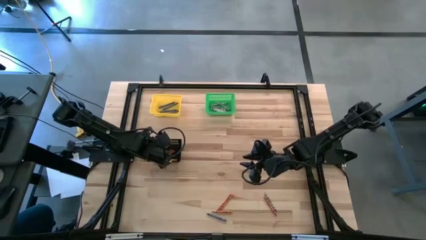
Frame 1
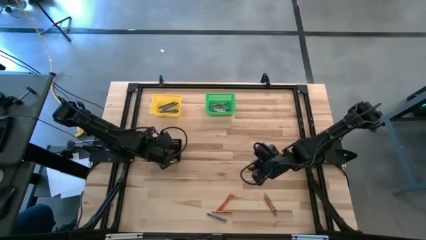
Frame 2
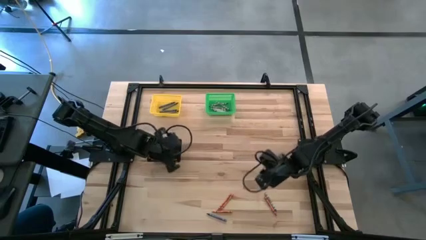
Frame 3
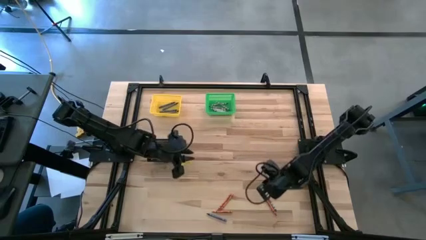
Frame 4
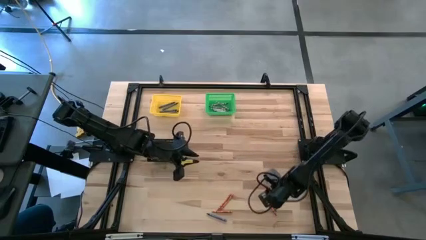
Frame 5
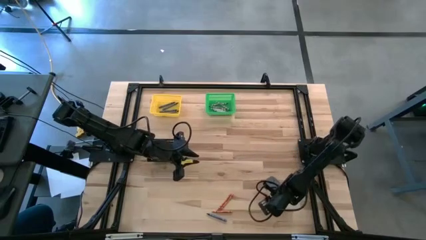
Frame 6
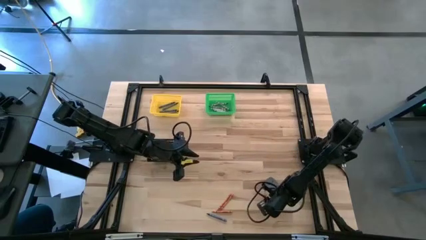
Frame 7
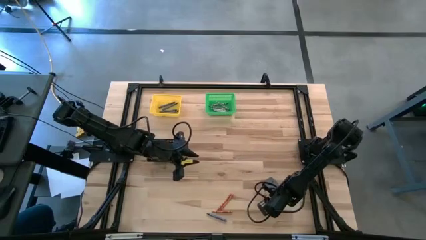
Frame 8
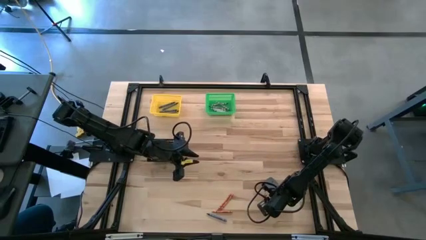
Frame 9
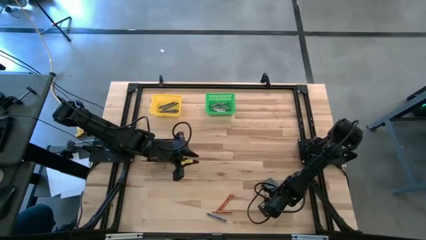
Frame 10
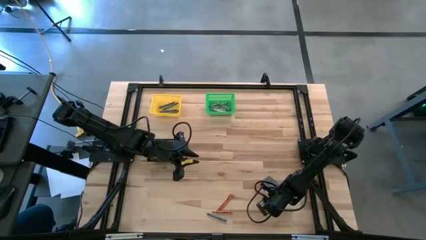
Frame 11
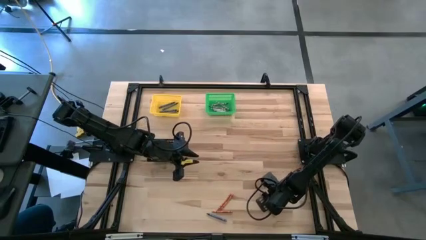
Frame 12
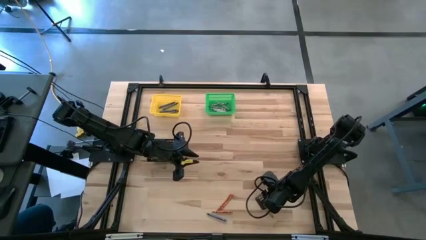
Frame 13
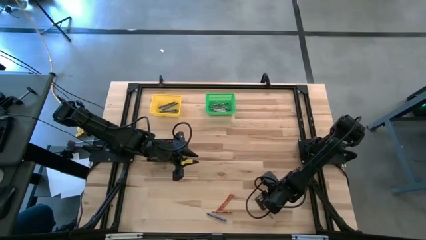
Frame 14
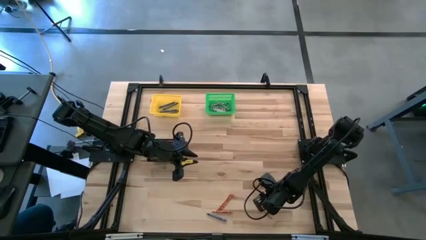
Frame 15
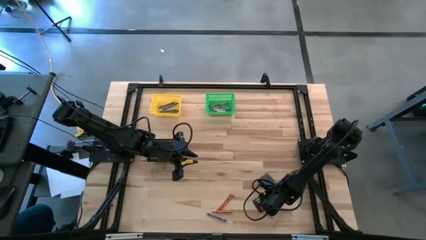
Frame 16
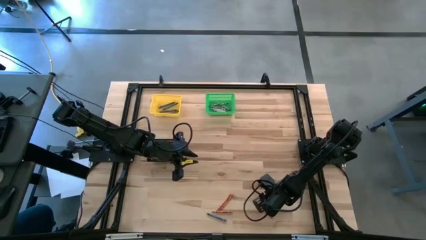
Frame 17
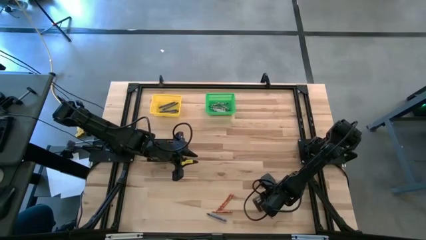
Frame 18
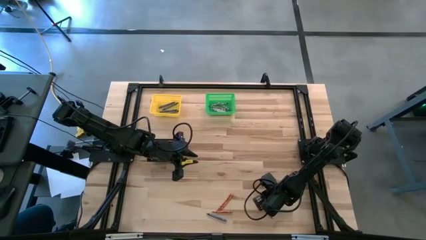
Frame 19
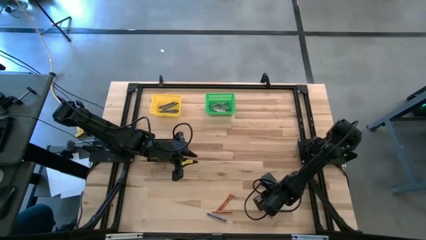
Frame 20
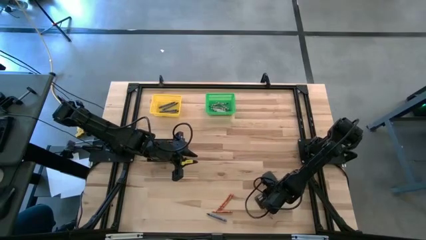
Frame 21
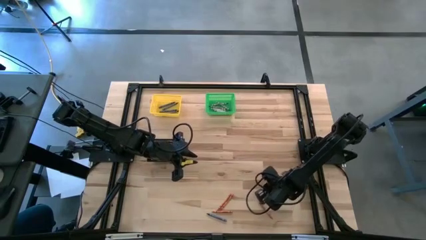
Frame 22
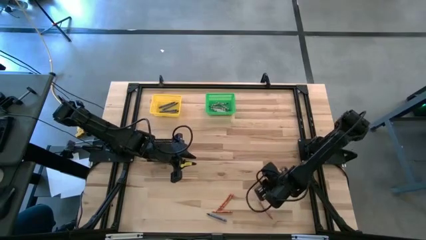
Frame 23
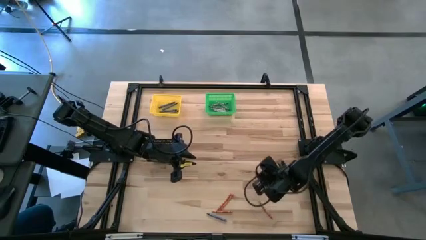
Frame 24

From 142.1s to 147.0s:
Task: Sort crayons
Put the gray crayon into the green bin

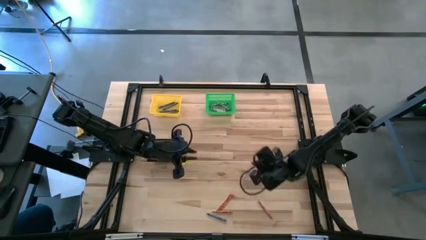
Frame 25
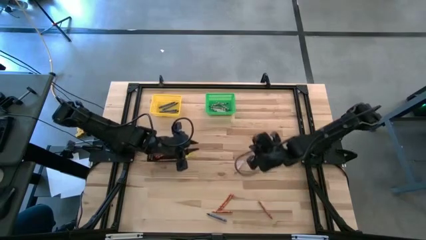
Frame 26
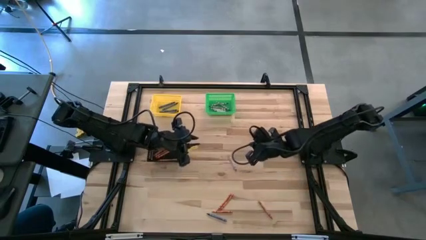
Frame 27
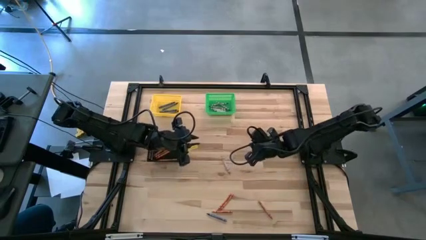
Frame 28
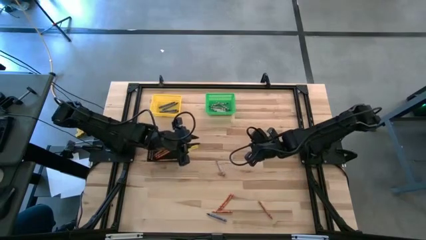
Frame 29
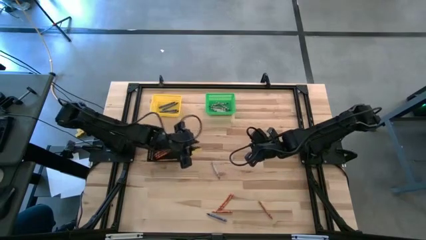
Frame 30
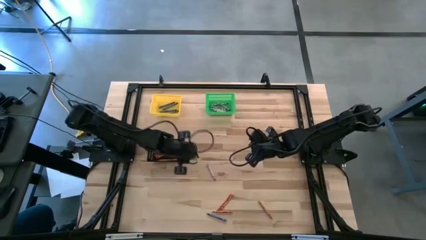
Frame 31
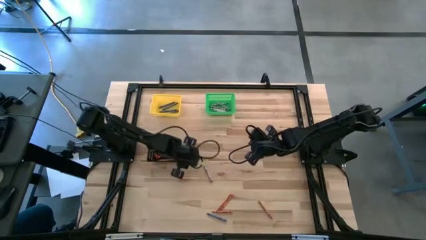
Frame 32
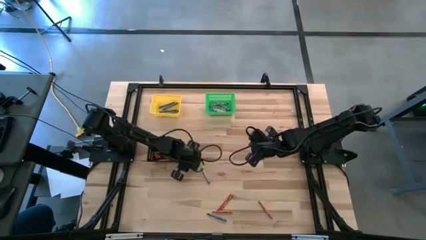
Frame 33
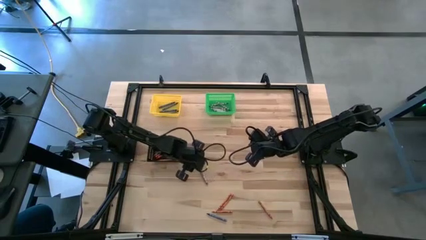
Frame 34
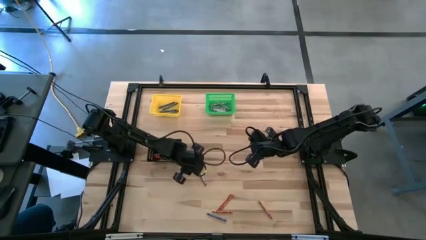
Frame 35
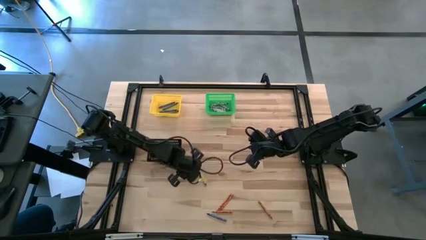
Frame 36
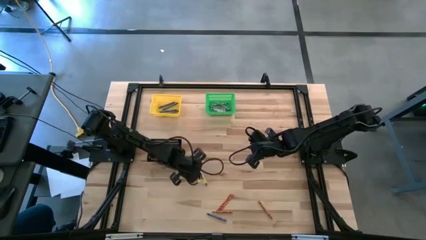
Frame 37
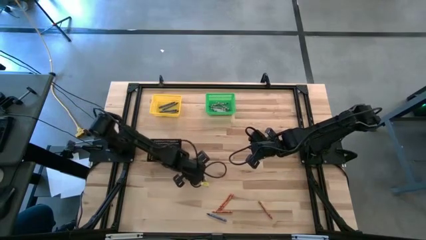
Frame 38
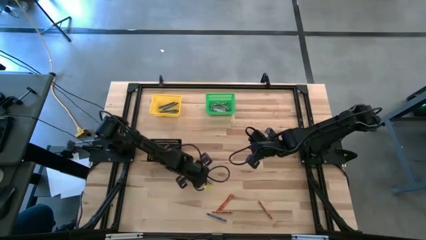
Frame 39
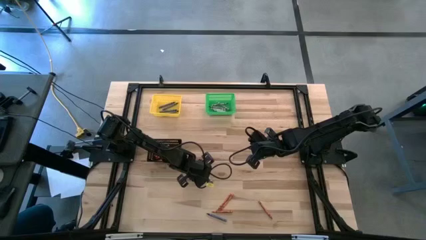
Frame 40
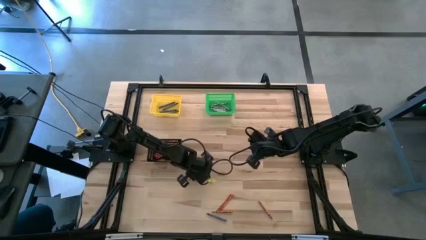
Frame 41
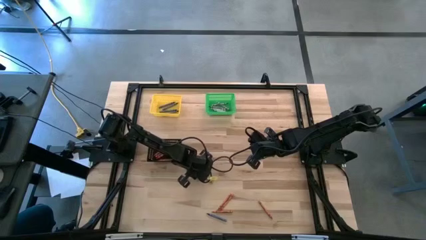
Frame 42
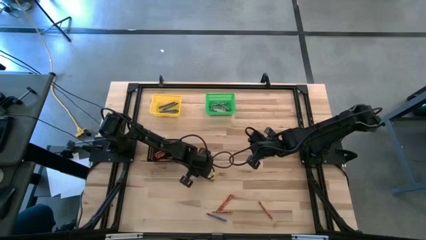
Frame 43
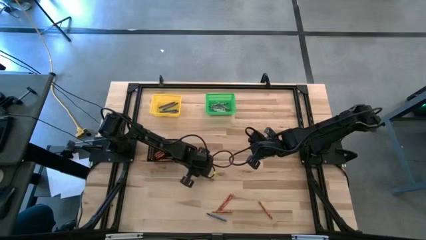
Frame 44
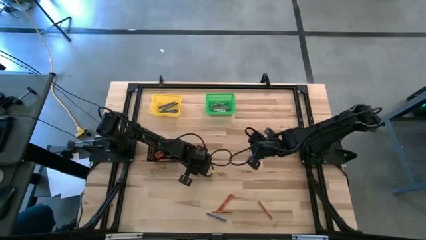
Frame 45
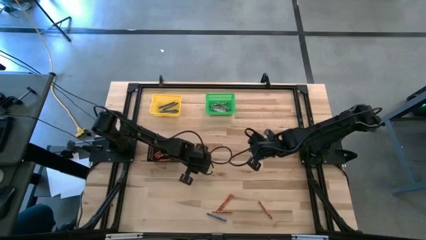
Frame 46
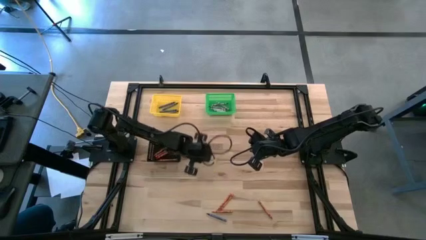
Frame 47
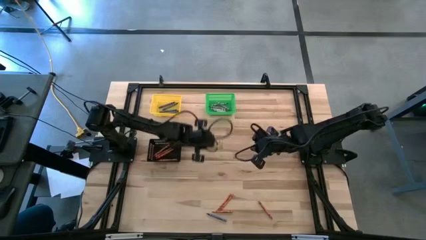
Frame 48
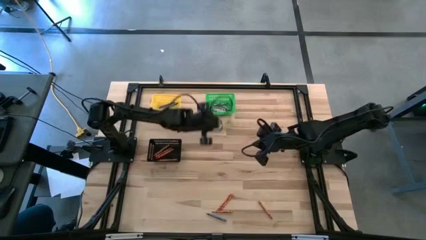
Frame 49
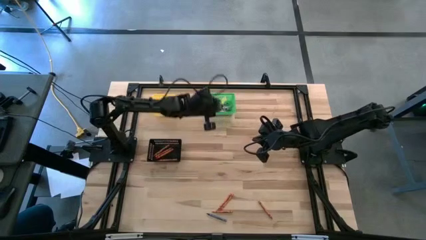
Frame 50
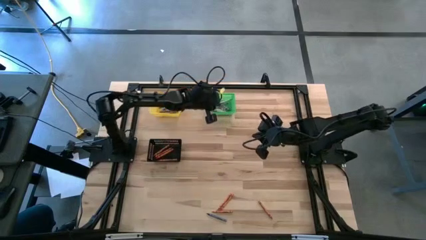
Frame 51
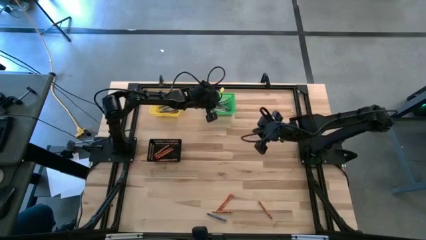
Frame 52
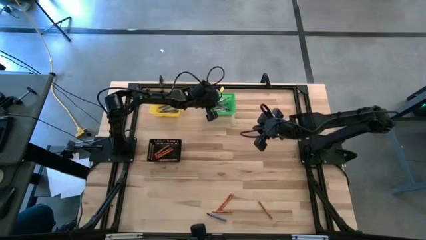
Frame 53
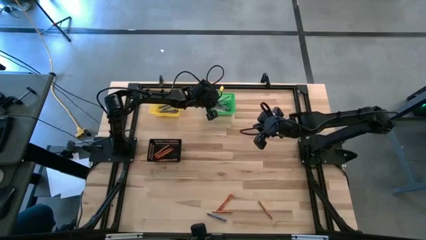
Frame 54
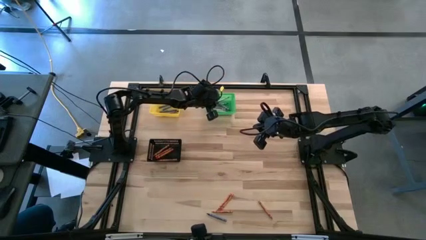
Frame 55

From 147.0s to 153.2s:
Put the gray crayon into the green bin

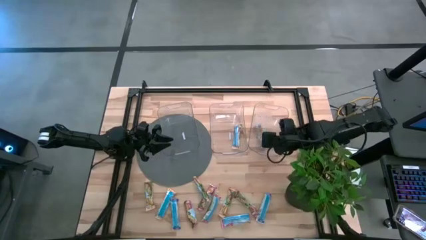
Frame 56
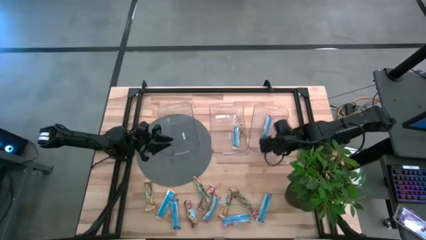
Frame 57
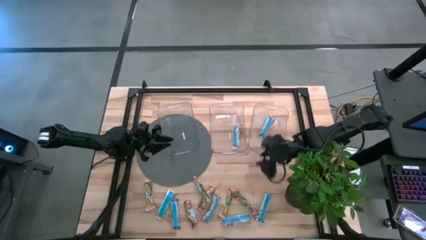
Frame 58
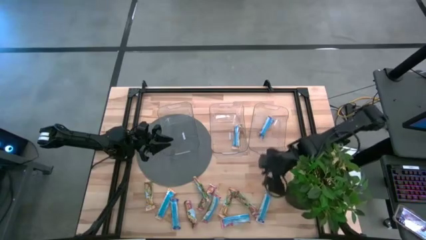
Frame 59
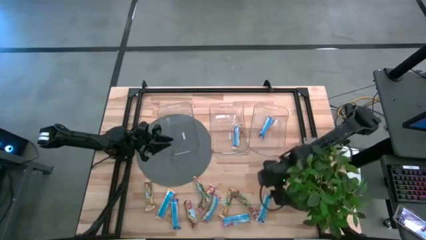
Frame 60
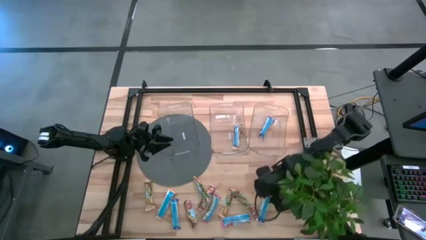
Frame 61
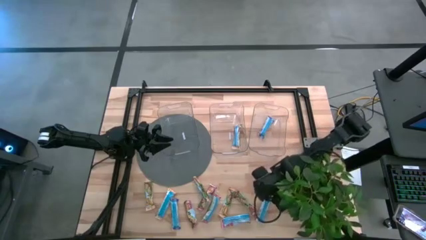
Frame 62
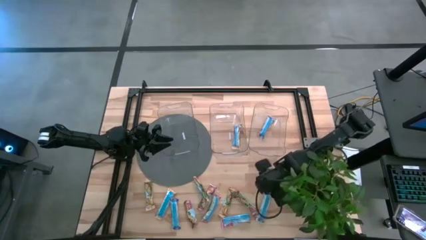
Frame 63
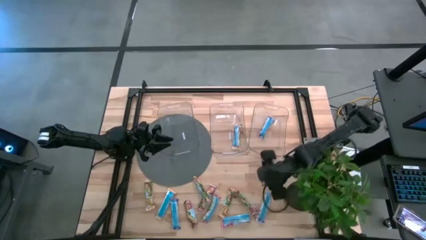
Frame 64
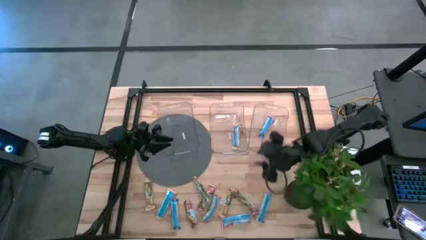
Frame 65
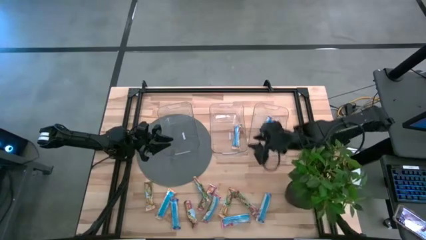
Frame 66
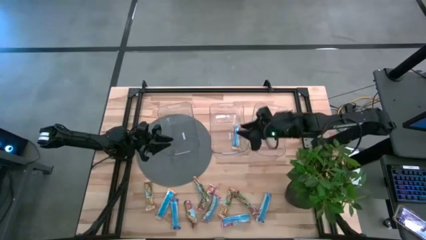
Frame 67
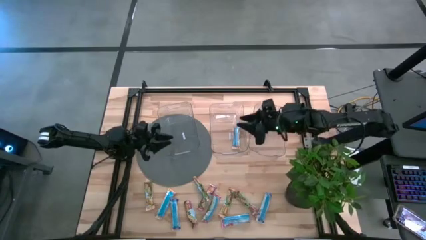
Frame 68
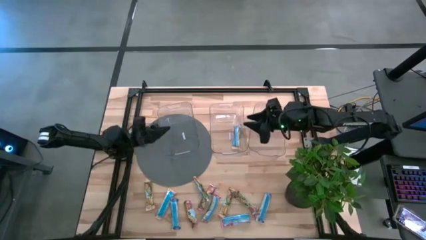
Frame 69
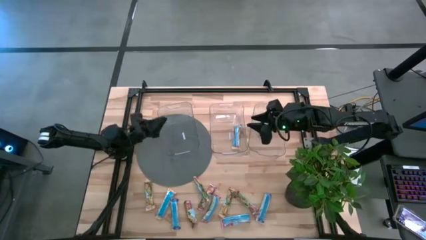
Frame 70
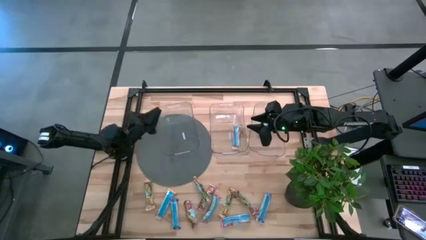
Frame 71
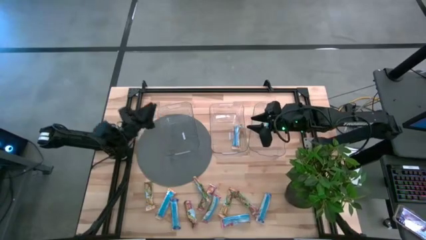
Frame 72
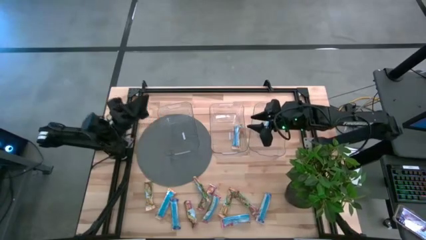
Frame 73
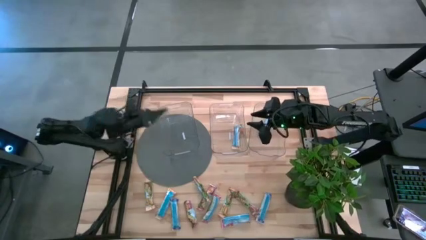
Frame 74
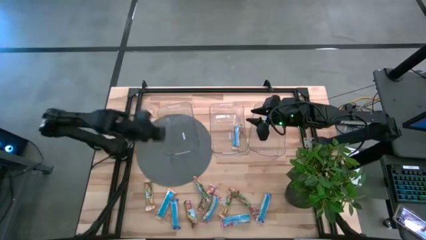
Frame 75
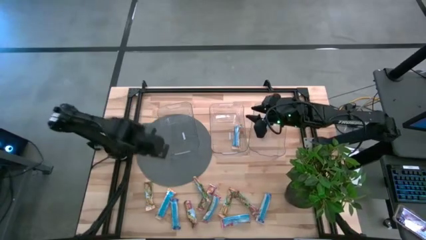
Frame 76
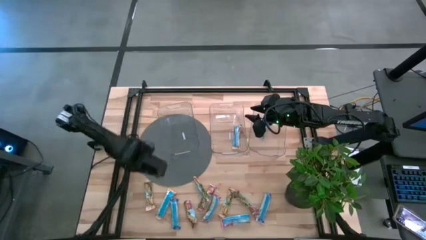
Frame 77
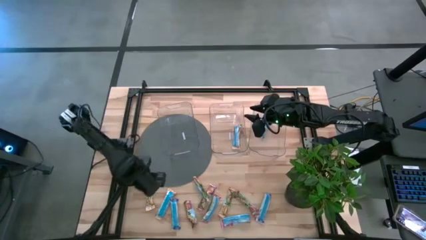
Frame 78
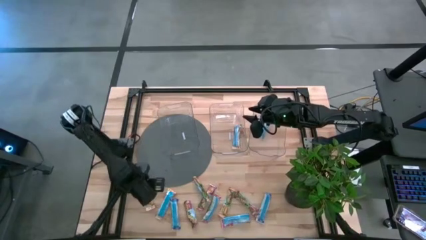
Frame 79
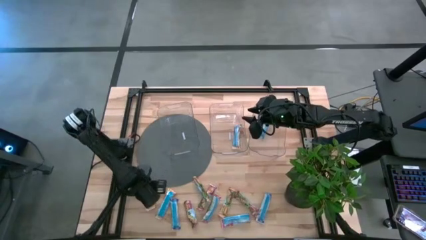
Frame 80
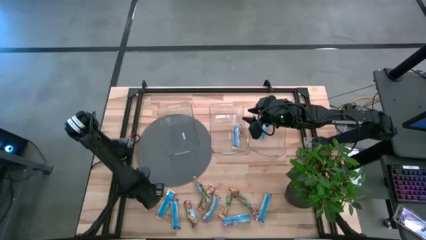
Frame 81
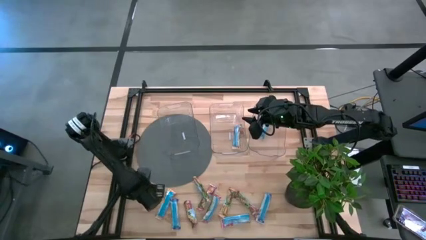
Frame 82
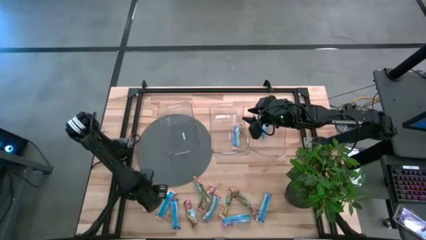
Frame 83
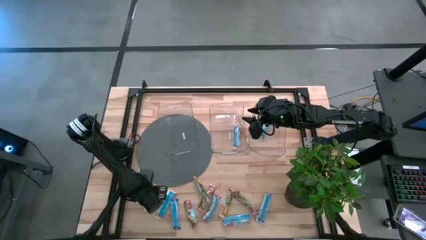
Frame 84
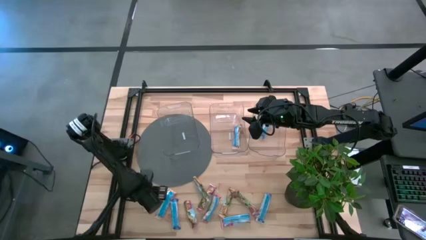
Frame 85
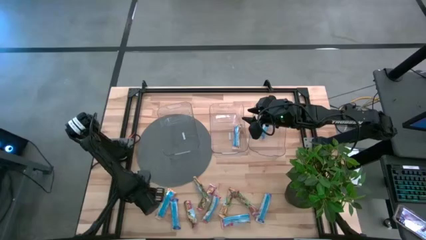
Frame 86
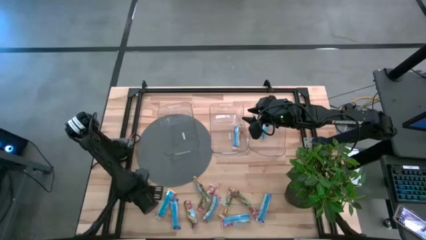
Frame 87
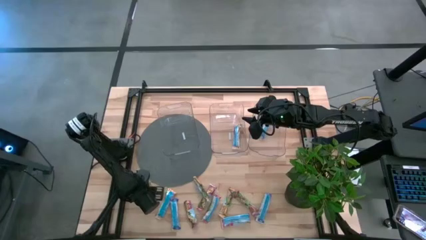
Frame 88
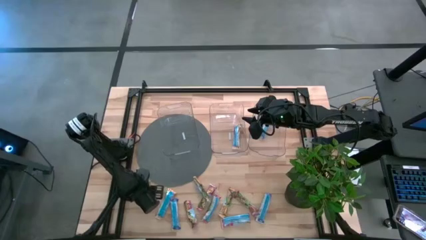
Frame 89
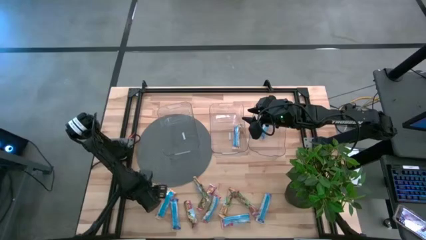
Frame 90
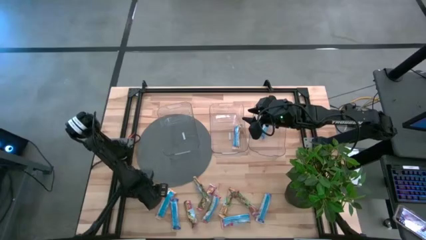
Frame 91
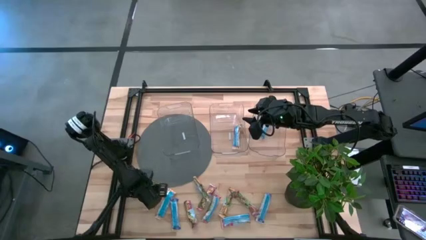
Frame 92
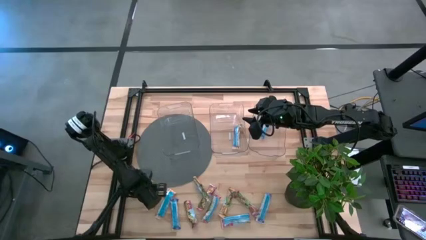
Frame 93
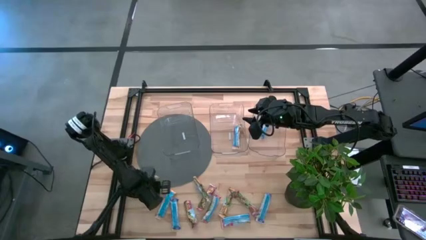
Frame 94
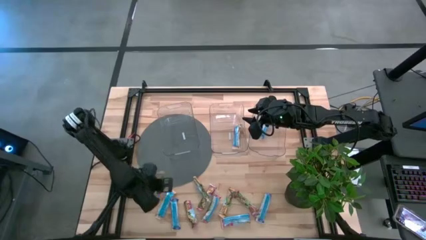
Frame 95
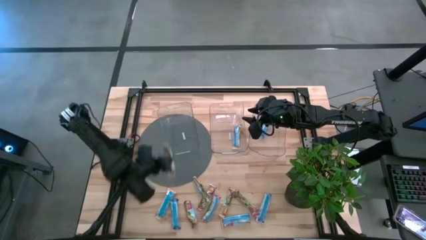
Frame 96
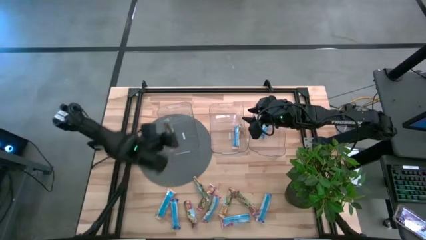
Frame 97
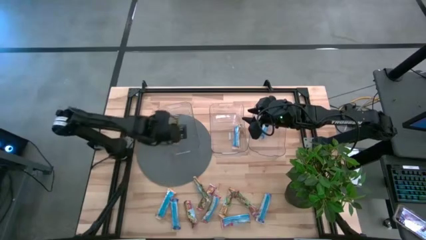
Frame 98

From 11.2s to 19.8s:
Task: Pick and place Granola Bars by type
Put the yellow granola bar into the middle transparent bin
